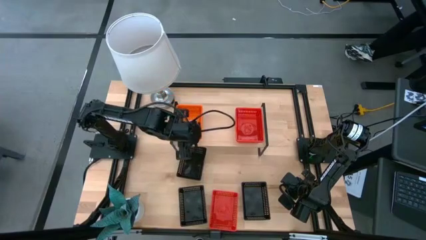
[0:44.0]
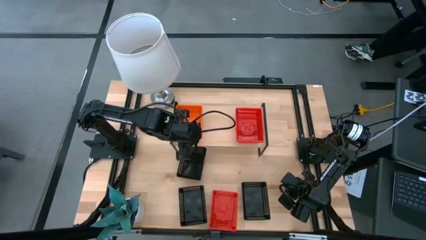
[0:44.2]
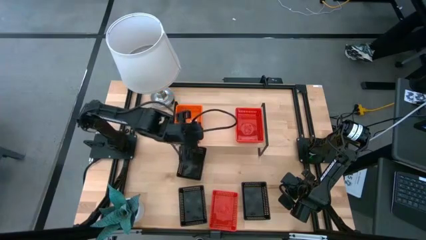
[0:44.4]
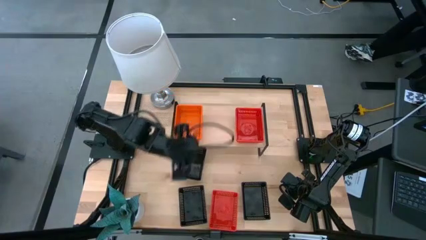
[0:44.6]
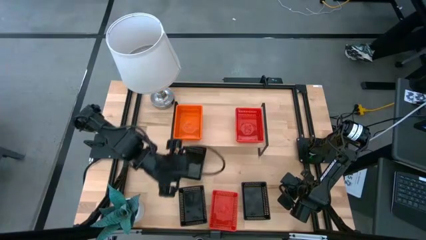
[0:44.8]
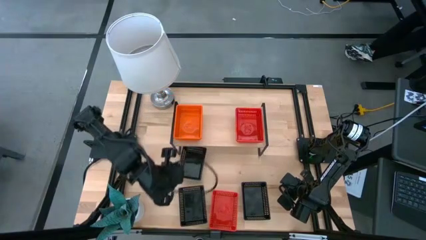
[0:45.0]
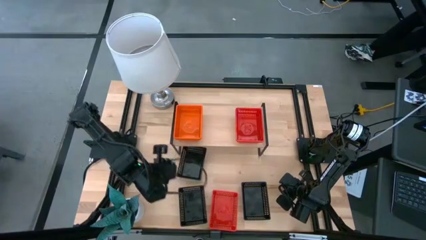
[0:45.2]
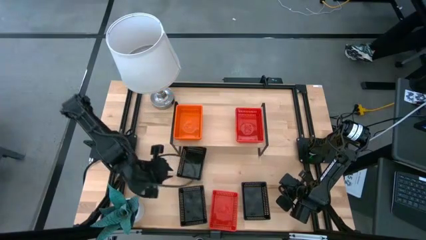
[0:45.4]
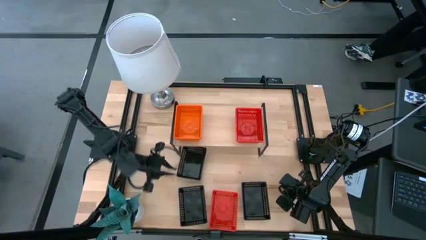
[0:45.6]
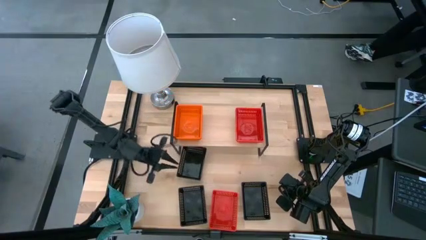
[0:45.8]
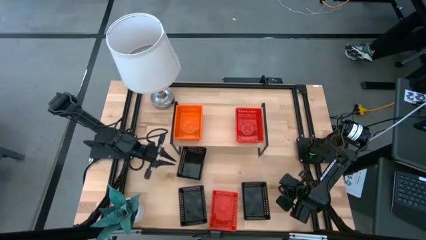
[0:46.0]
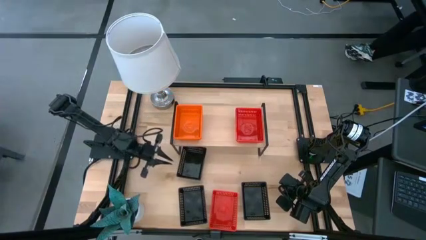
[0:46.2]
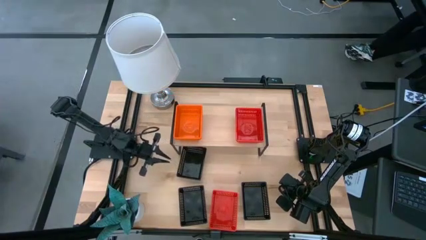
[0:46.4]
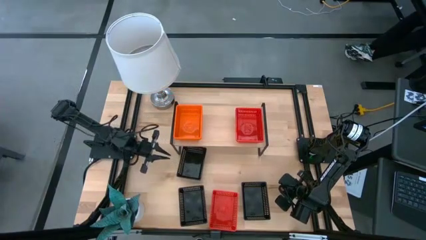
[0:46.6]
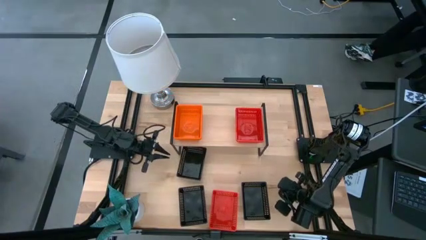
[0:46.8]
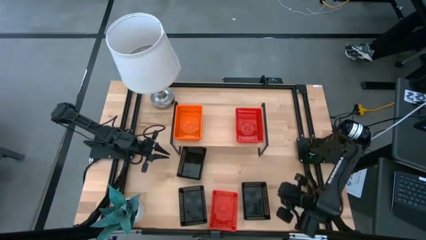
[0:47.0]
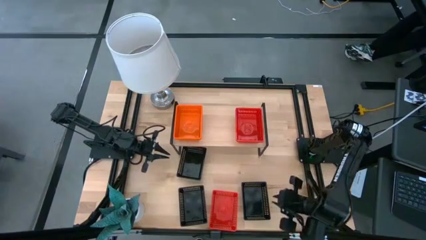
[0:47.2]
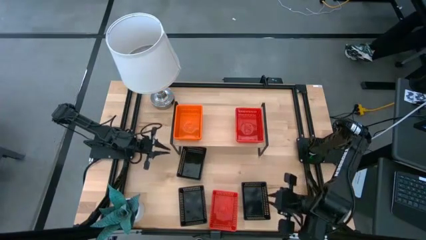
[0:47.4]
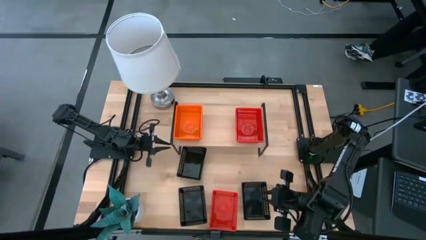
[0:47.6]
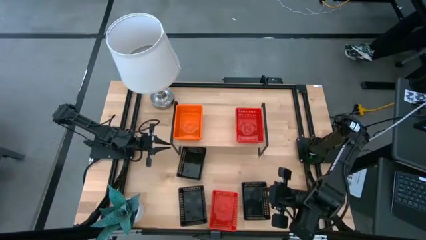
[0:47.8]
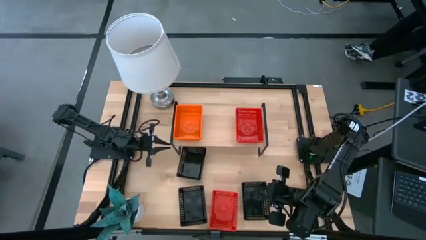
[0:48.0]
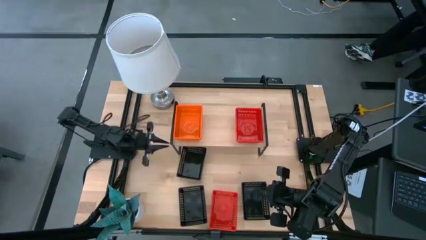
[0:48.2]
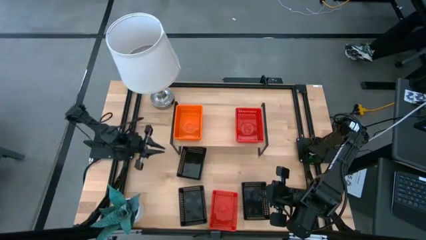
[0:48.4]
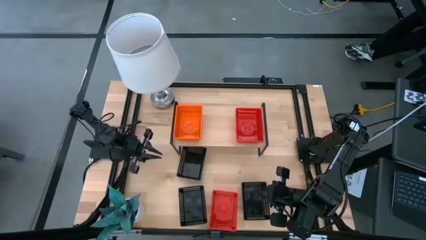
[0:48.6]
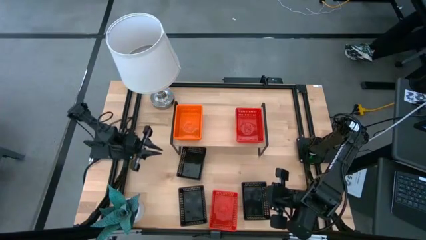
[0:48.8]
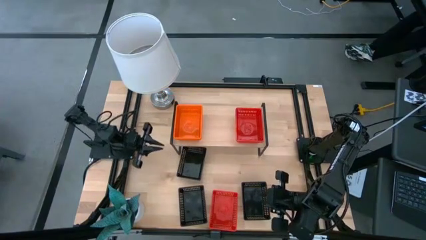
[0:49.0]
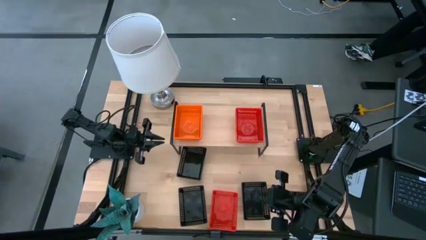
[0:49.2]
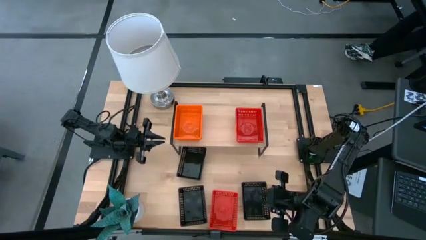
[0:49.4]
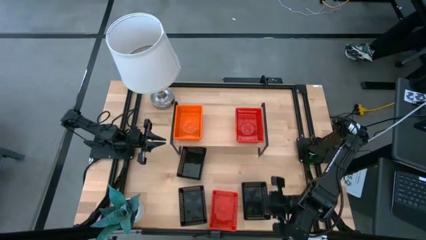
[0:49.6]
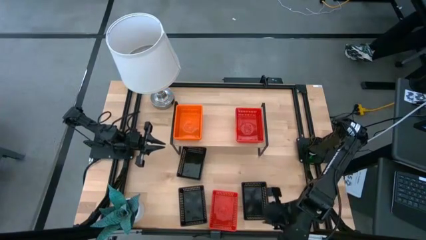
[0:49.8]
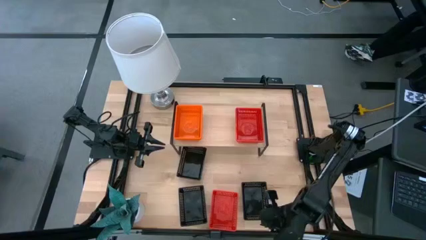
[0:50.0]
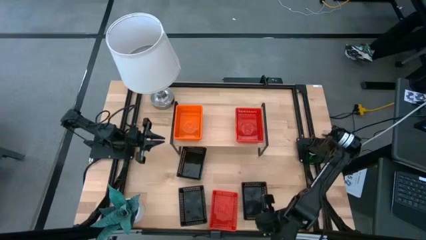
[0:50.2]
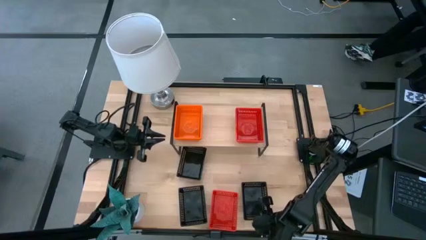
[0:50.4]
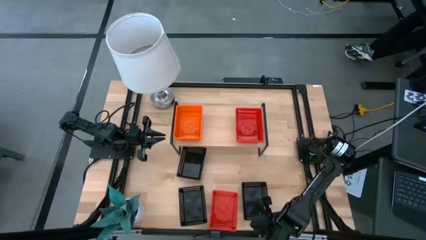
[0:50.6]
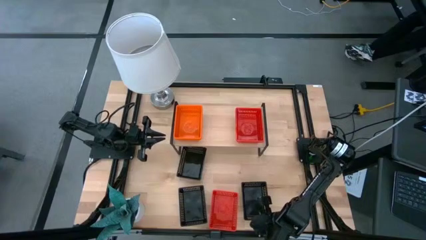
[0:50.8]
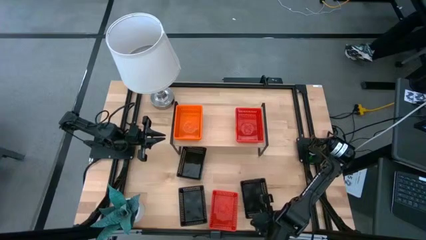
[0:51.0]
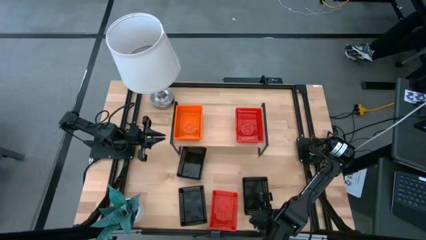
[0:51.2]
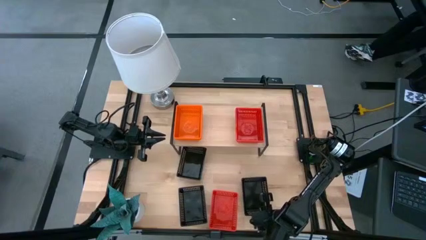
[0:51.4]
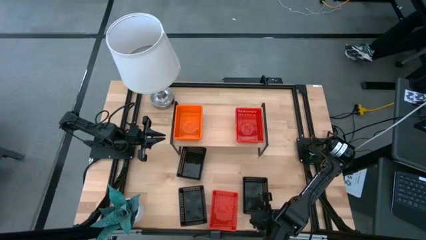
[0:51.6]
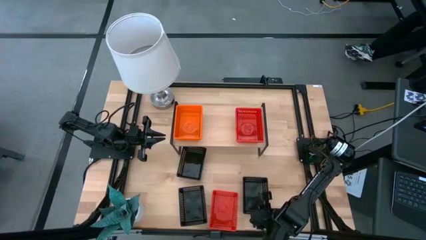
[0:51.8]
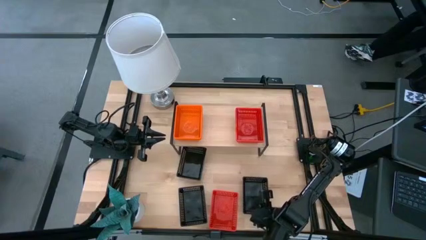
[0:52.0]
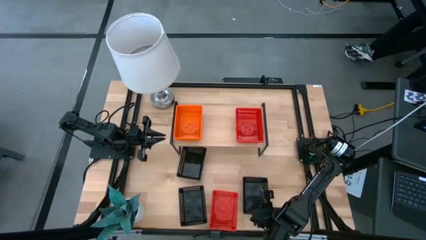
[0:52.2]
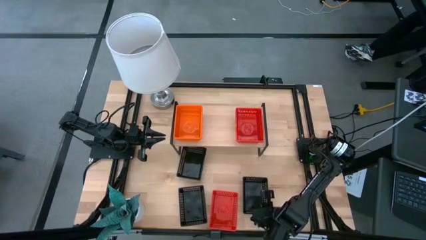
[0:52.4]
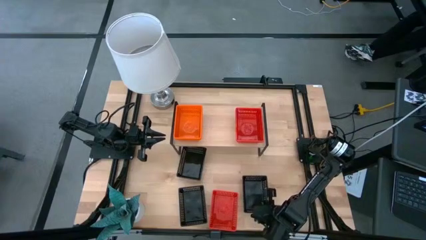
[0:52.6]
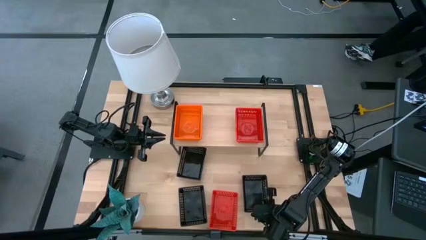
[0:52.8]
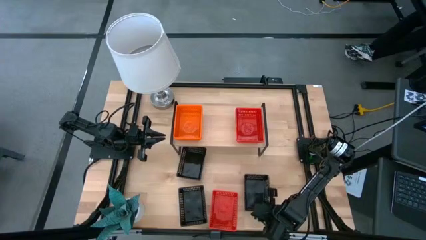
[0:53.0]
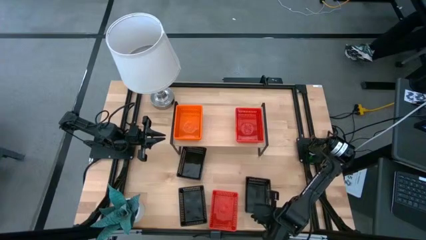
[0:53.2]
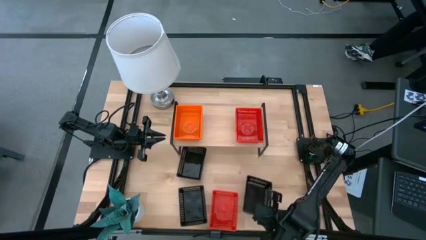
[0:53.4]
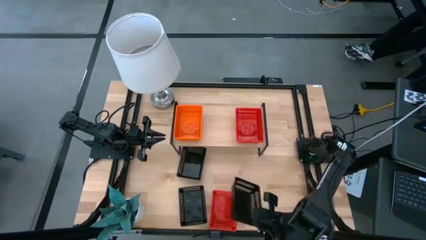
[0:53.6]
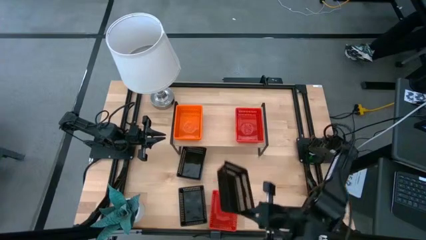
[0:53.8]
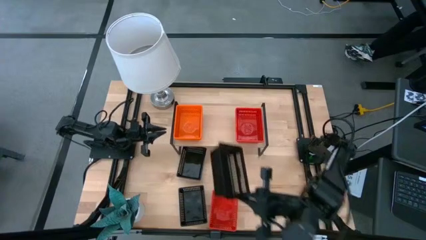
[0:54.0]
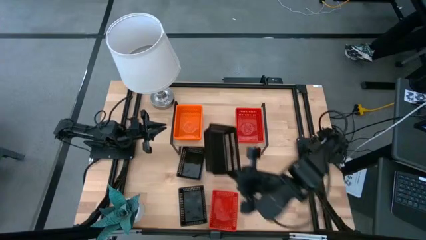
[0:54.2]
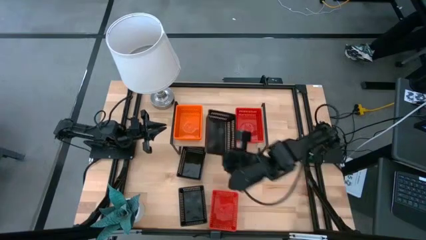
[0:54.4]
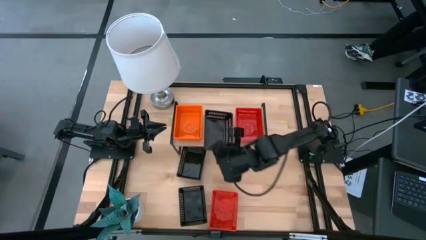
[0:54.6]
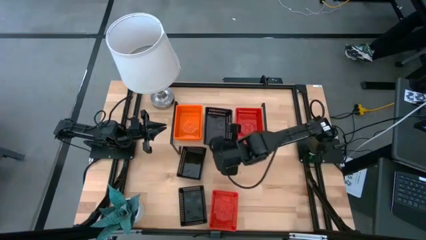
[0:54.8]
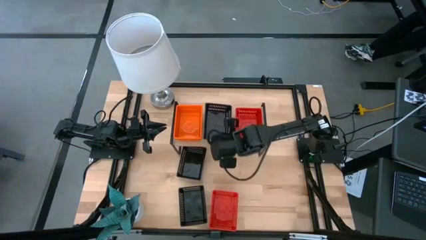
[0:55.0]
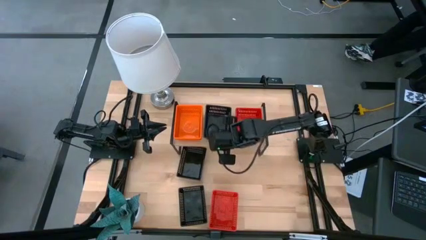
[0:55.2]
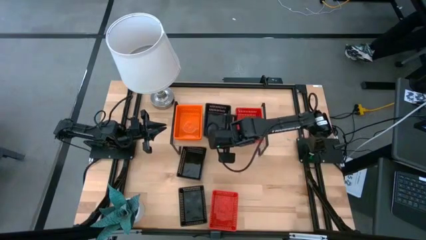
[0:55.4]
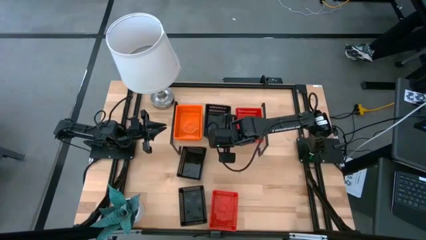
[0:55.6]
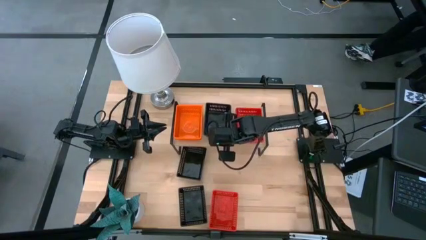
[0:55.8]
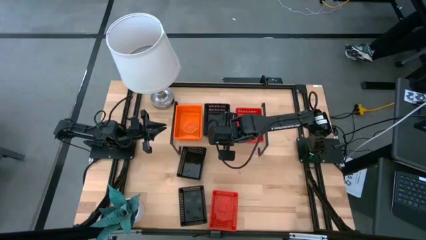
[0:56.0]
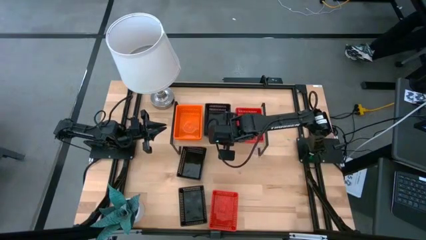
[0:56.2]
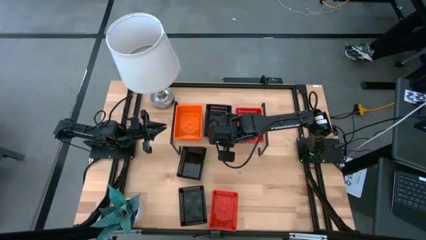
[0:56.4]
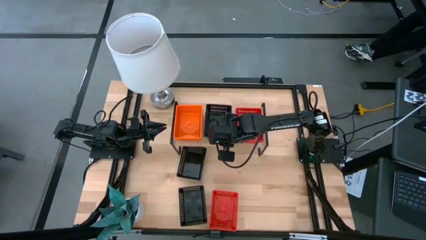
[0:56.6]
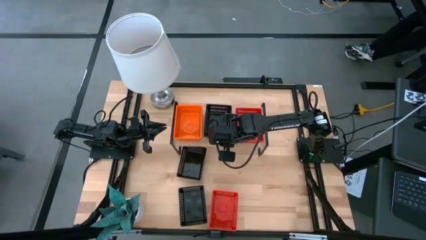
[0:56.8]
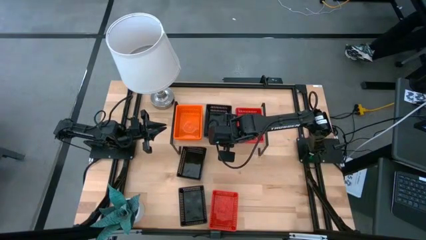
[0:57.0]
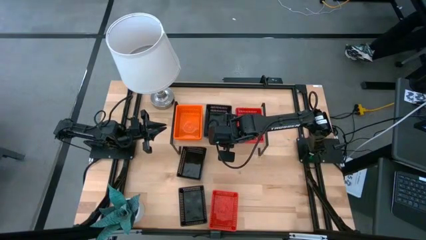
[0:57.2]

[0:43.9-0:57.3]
Task: Stack baskets on shelf by color
Put the bottom right black bin on the shelf

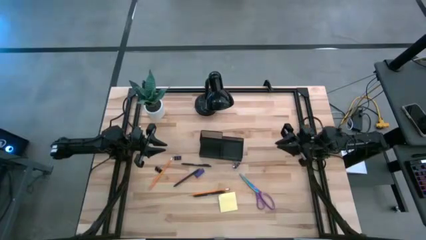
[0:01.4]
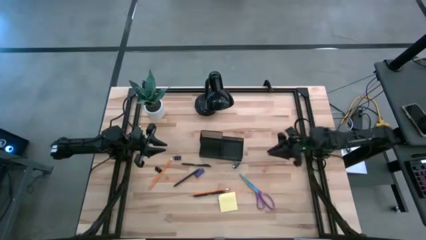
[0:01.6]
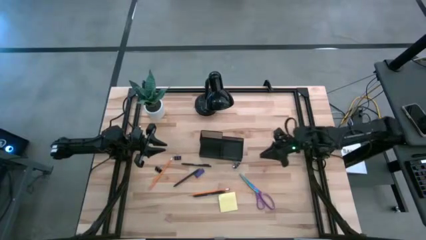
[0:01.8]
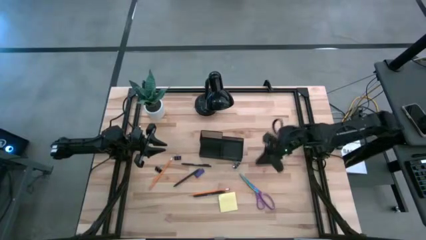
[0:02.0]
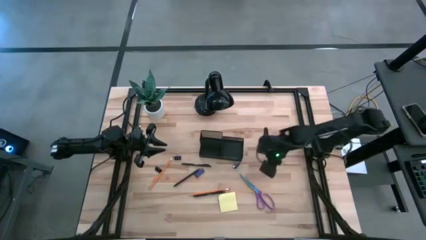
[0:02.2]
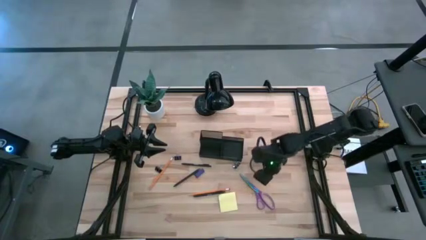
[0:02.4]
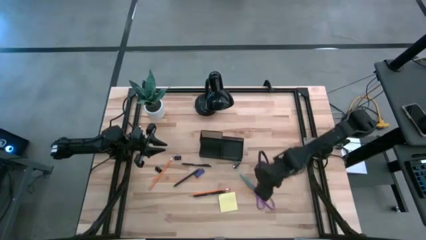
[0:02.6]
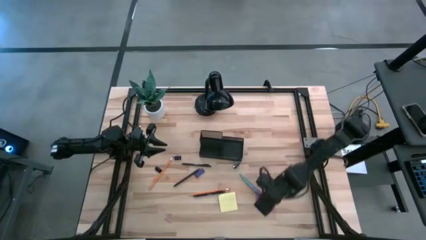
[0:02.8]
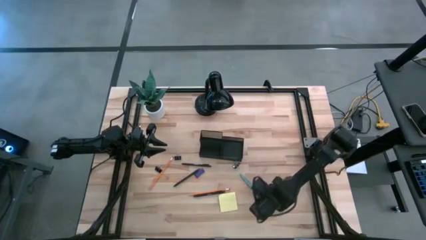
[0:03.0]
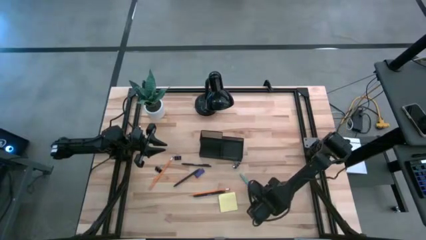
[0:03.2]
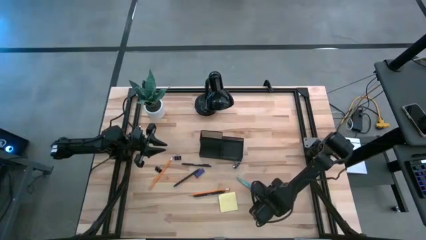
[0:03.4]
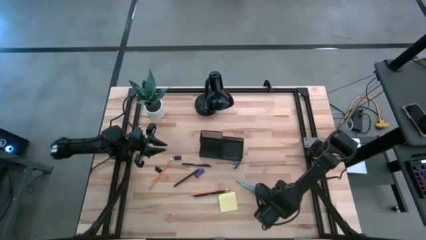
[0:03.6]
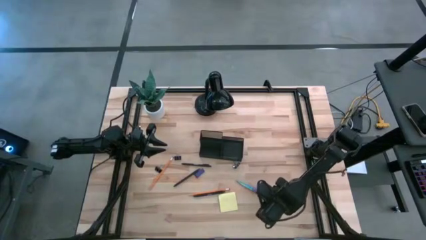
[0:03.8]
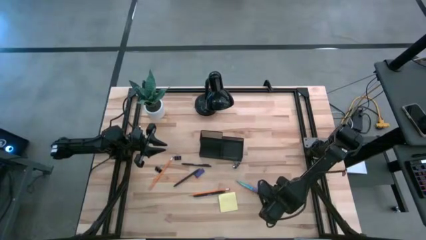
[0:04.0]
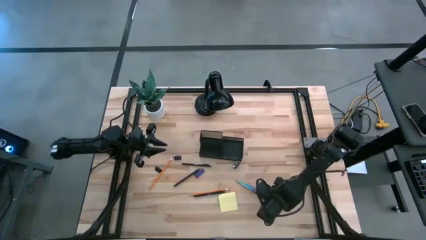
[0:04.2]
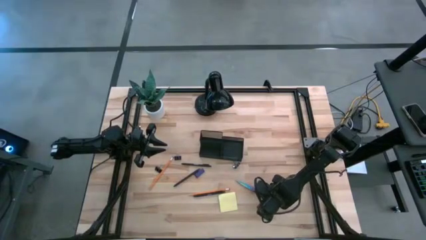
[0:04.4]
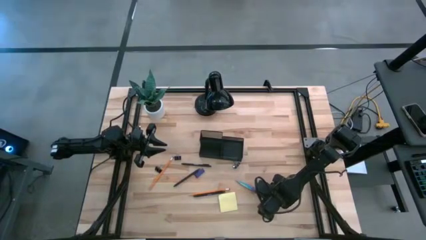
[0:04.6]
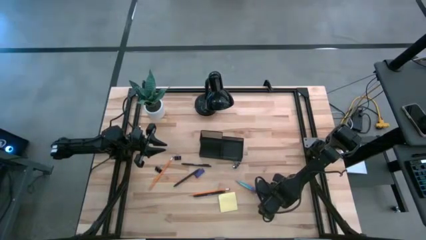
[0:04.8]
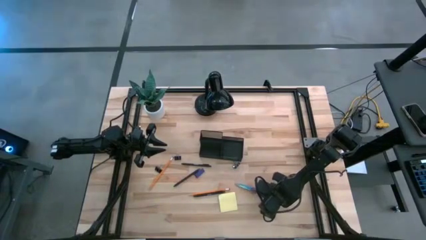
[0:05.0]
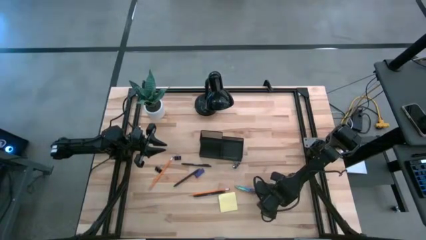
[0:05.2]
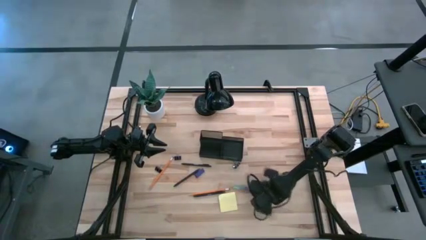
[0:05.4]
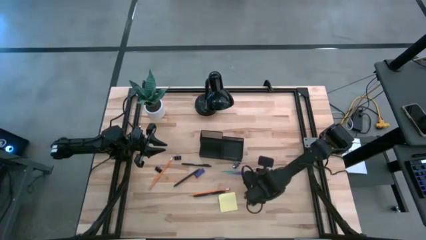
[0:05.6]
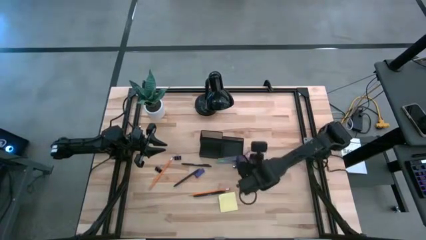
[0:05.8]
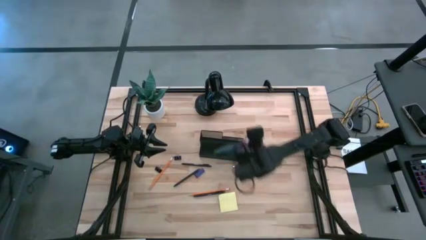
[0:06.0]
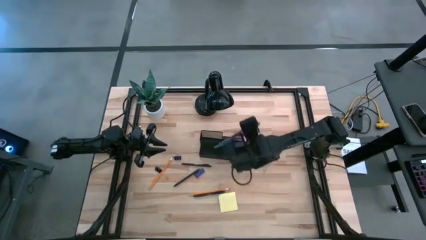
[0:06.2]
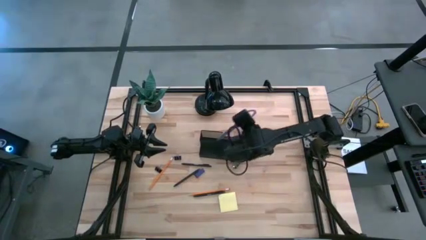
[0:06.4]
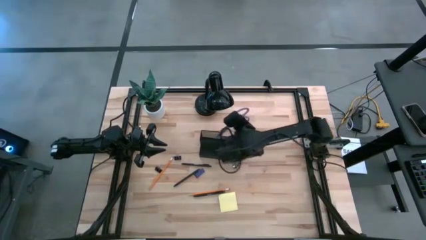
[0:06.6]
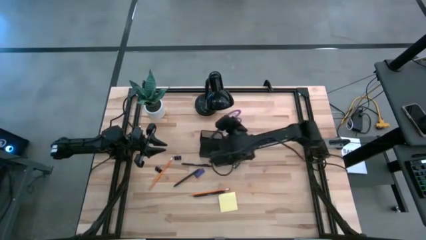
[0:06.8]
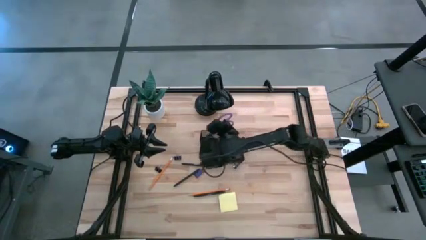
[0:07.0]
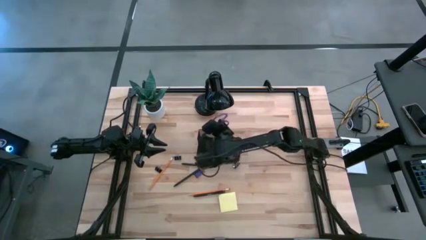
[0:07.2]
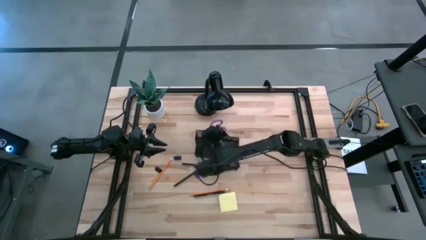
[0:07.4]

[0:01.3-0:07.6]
Task: Pick and place office supplies into organizer
Put the purple scissors into the black desk organizer
